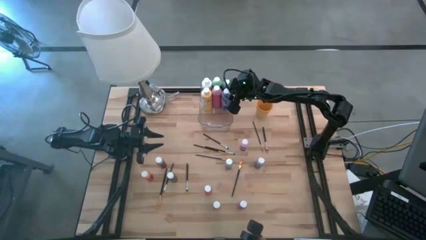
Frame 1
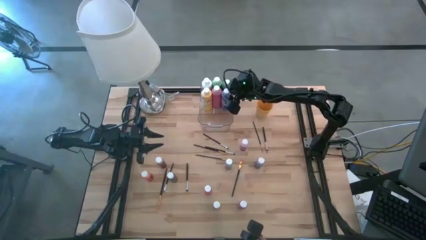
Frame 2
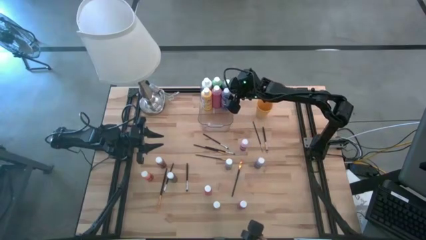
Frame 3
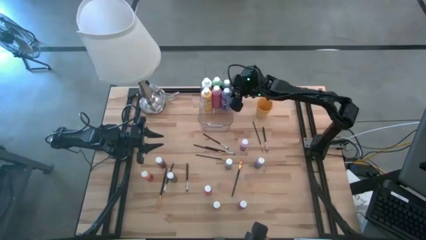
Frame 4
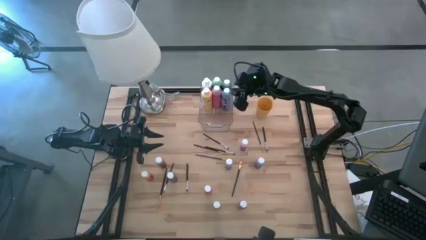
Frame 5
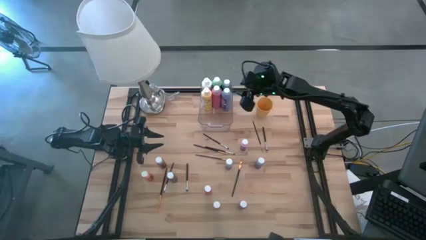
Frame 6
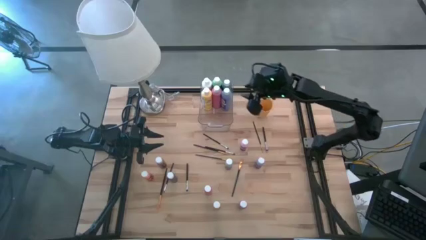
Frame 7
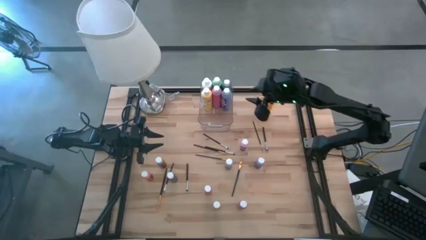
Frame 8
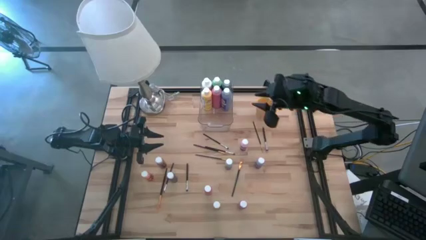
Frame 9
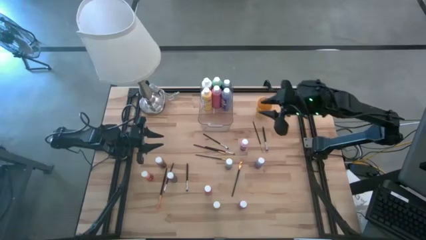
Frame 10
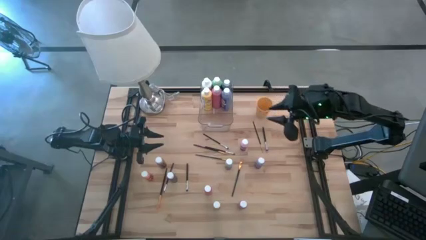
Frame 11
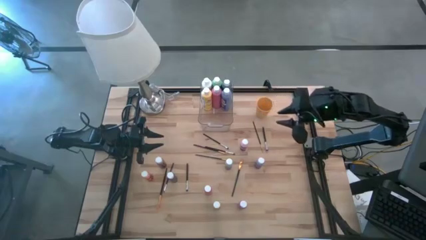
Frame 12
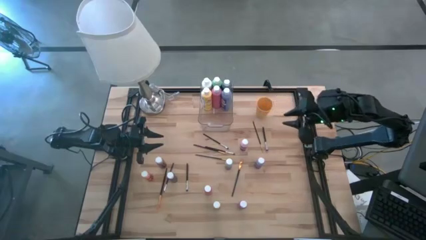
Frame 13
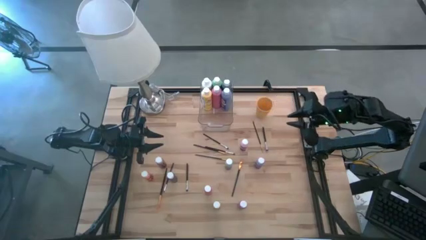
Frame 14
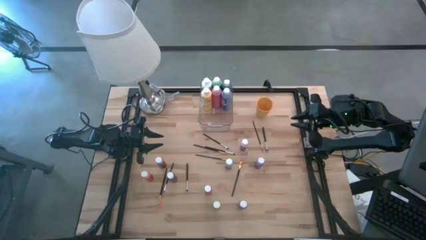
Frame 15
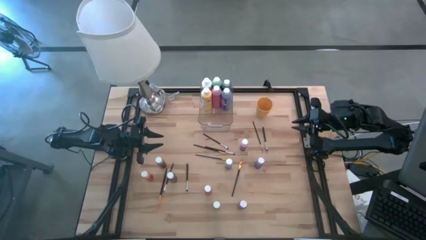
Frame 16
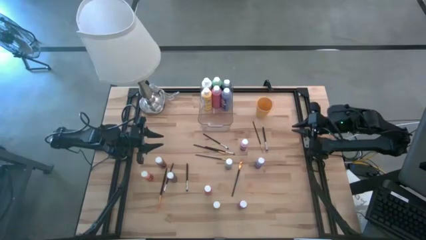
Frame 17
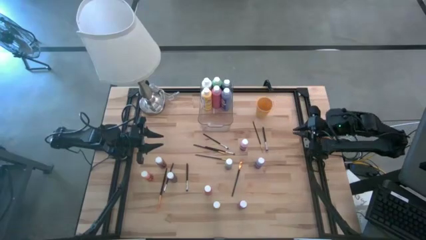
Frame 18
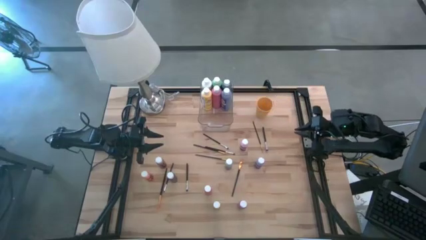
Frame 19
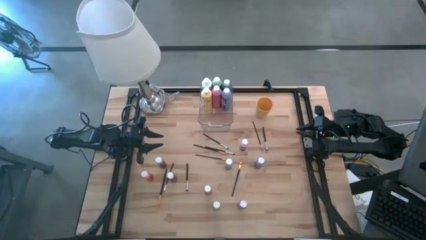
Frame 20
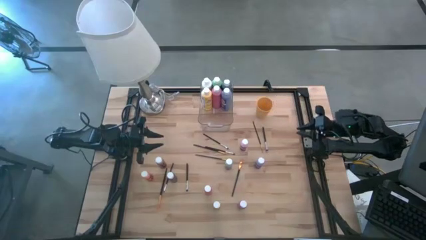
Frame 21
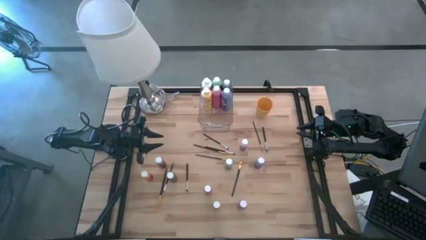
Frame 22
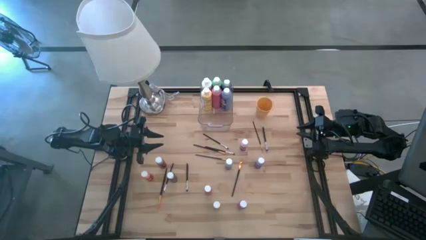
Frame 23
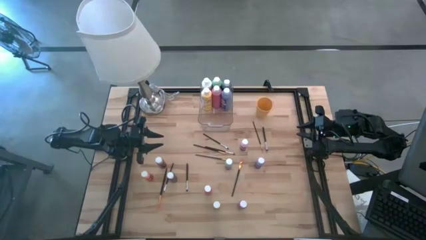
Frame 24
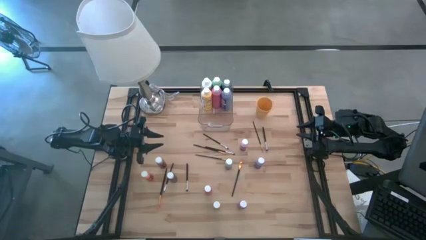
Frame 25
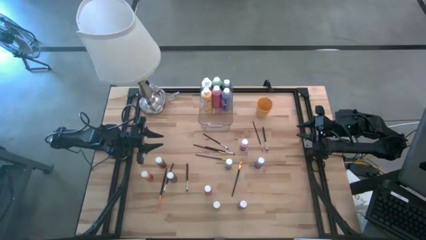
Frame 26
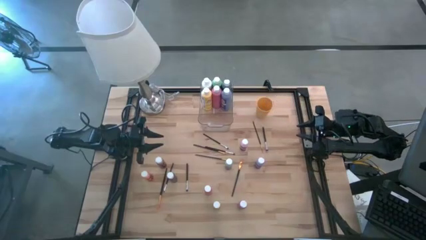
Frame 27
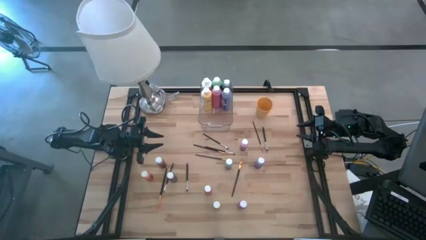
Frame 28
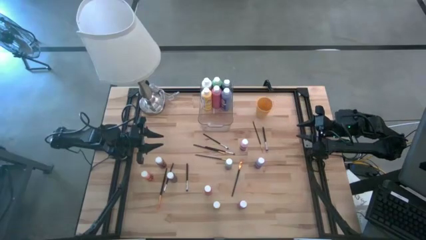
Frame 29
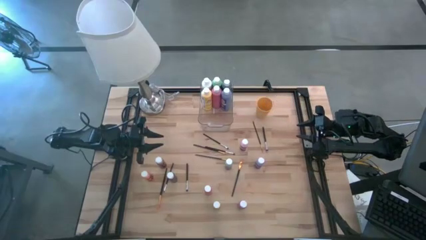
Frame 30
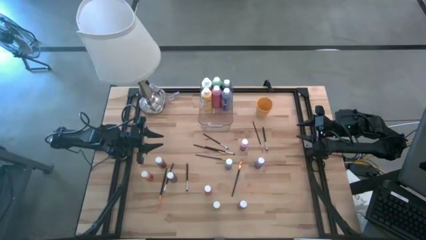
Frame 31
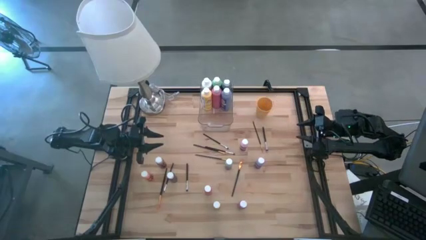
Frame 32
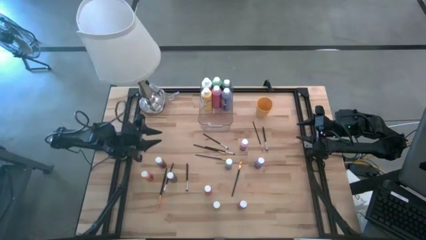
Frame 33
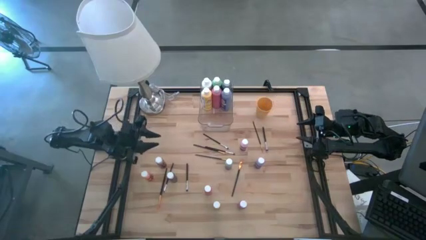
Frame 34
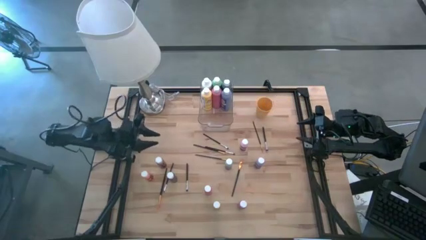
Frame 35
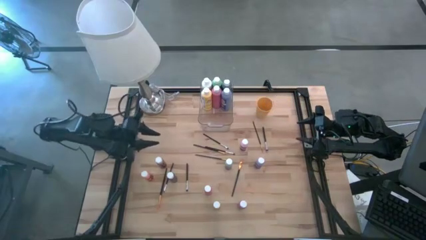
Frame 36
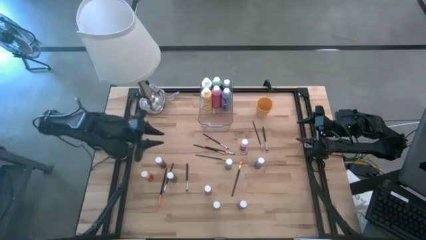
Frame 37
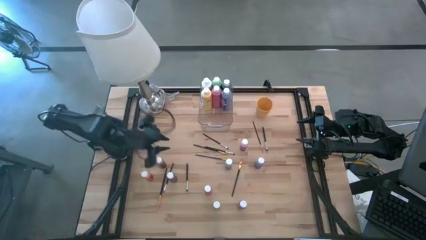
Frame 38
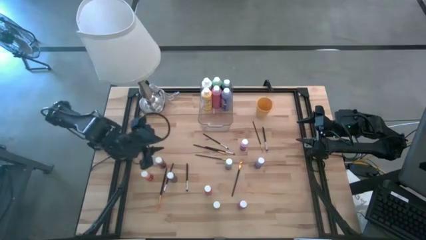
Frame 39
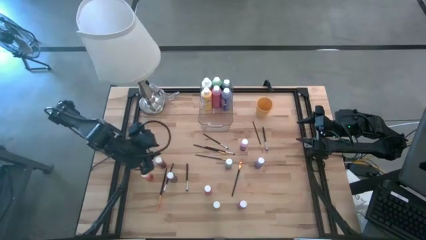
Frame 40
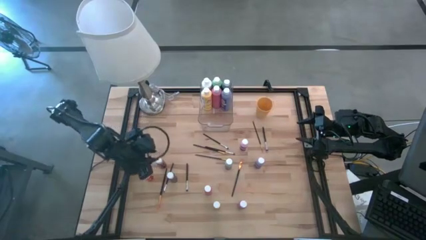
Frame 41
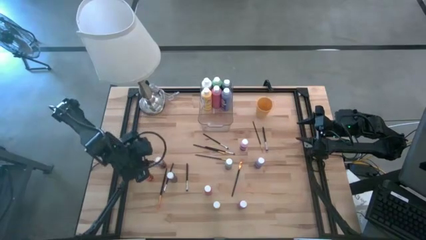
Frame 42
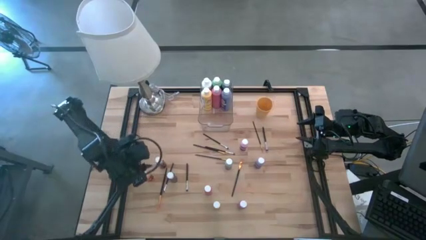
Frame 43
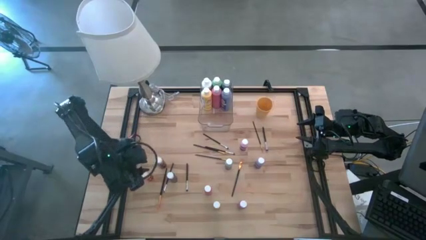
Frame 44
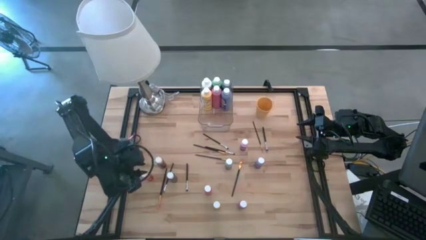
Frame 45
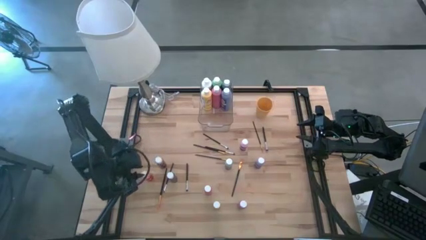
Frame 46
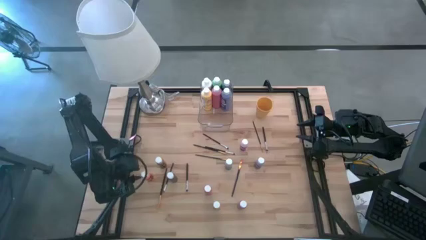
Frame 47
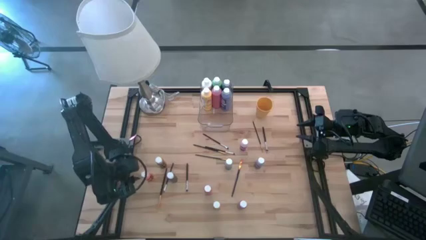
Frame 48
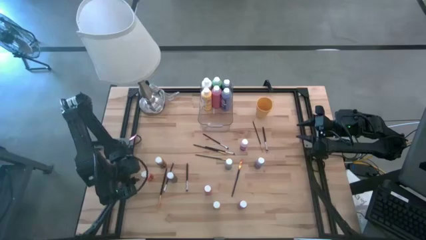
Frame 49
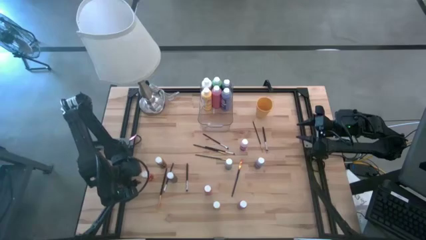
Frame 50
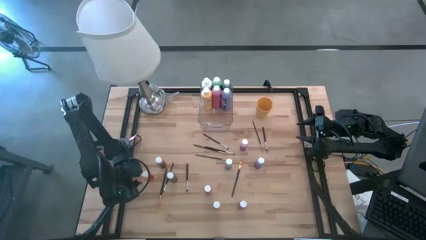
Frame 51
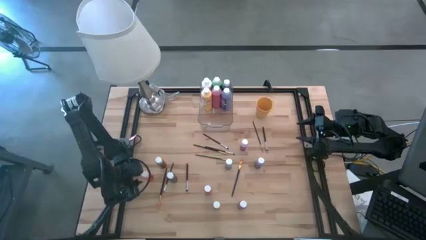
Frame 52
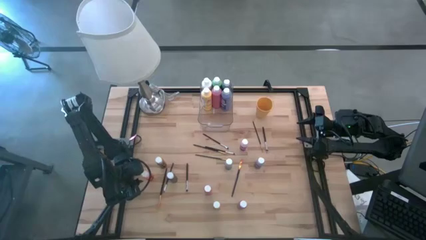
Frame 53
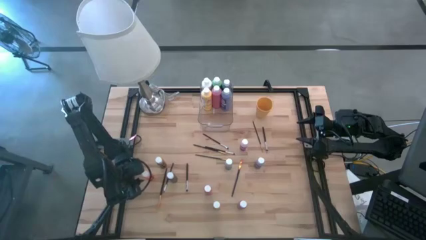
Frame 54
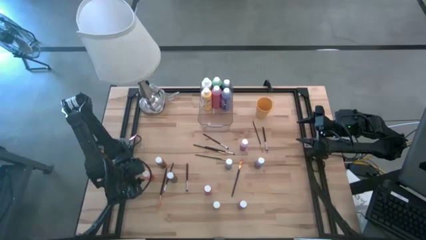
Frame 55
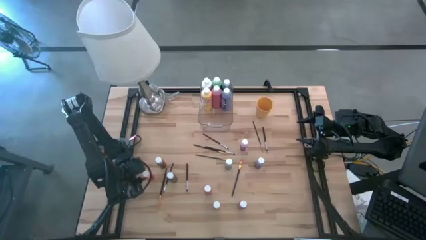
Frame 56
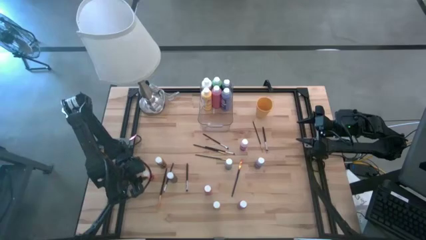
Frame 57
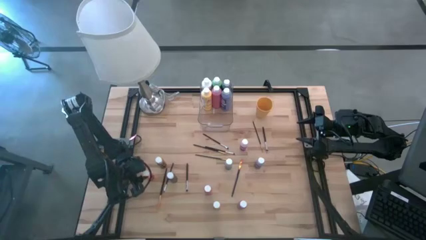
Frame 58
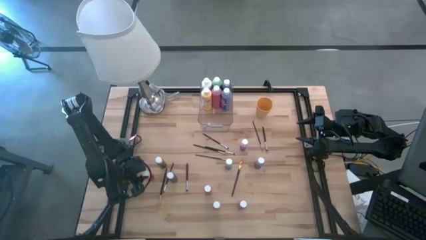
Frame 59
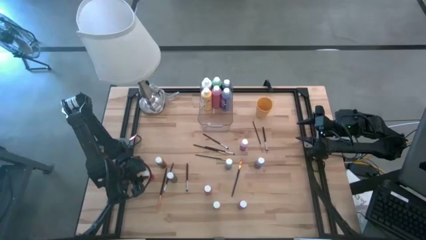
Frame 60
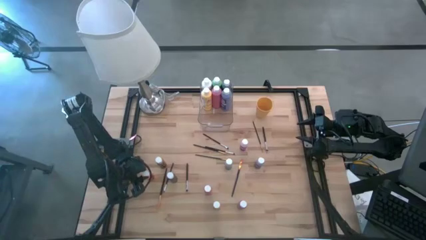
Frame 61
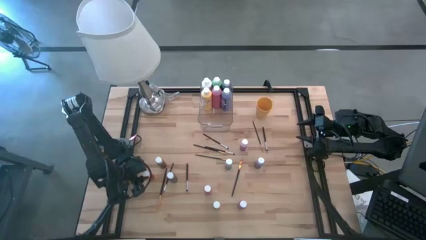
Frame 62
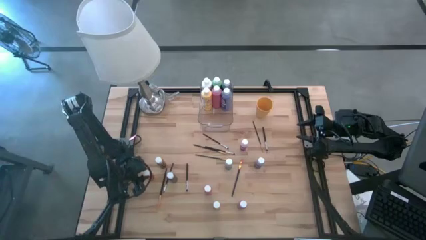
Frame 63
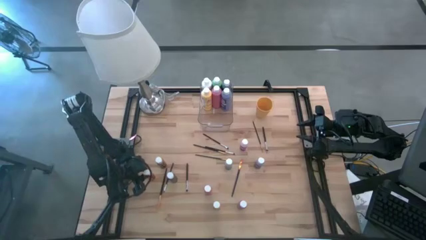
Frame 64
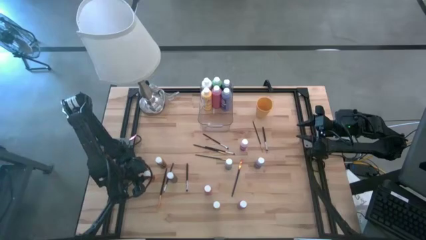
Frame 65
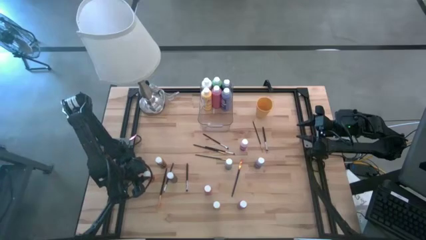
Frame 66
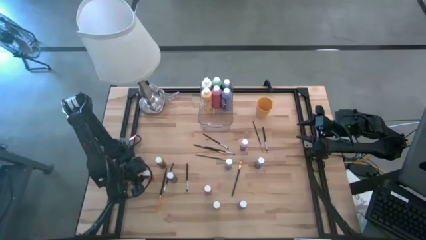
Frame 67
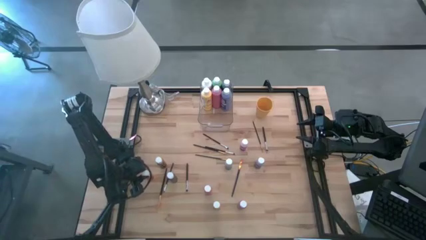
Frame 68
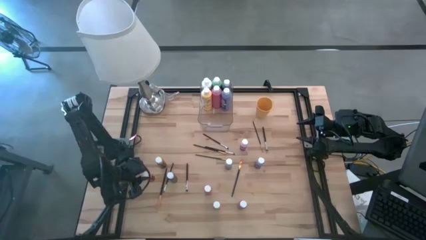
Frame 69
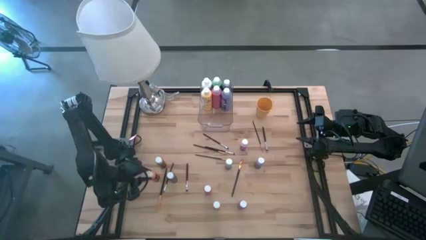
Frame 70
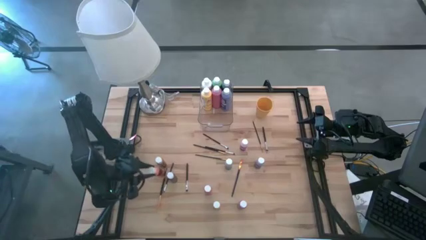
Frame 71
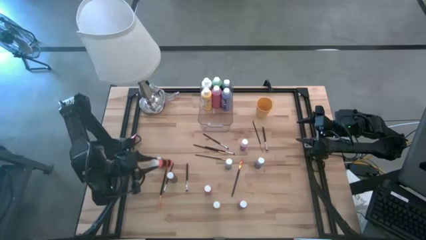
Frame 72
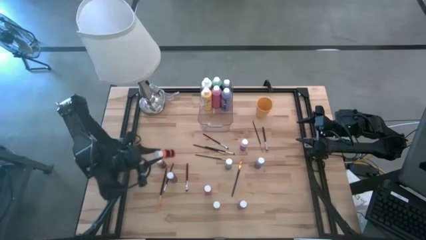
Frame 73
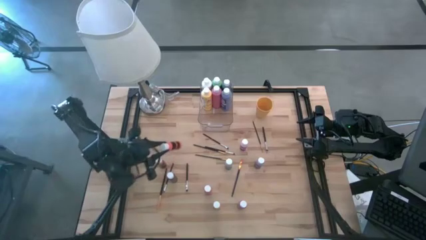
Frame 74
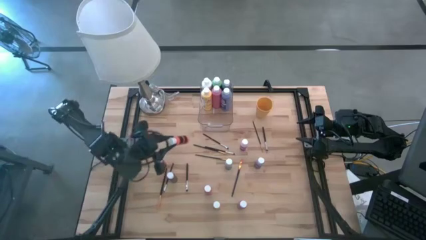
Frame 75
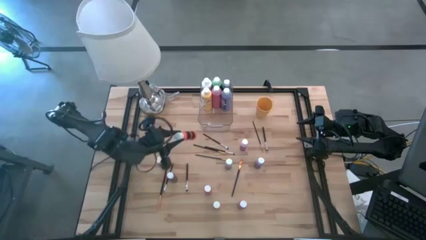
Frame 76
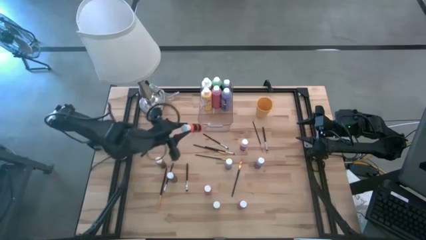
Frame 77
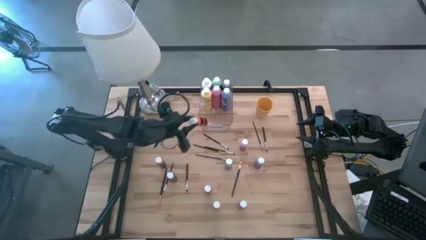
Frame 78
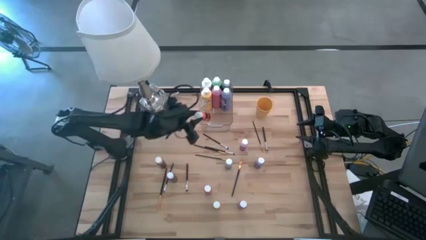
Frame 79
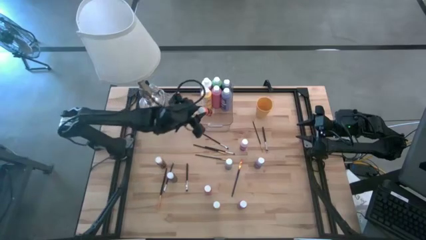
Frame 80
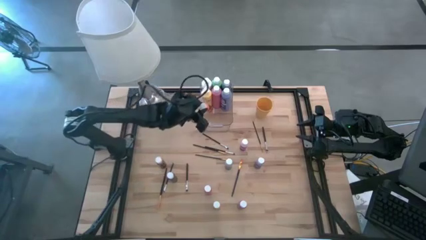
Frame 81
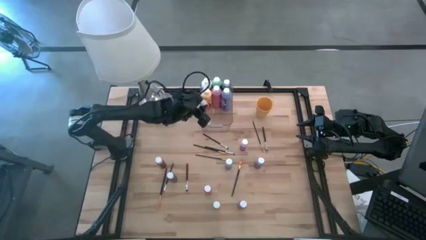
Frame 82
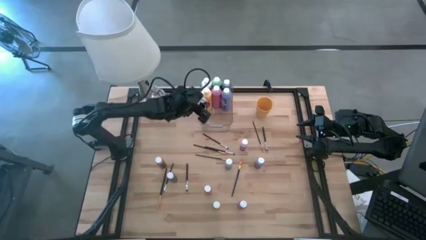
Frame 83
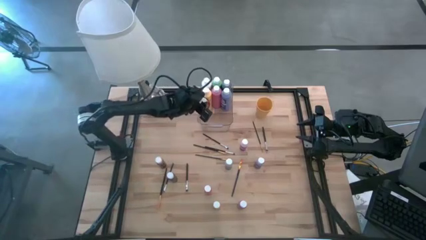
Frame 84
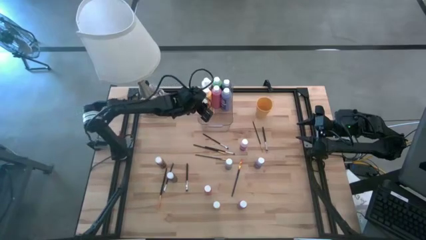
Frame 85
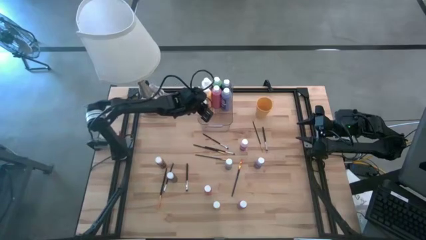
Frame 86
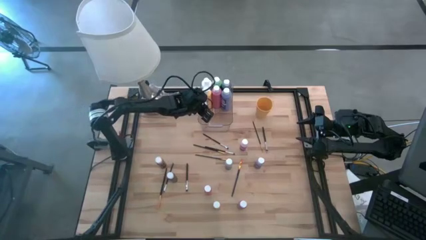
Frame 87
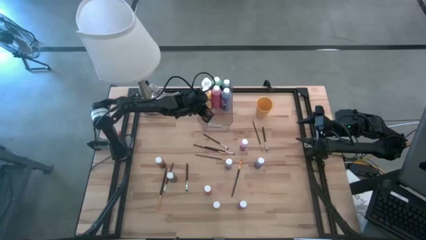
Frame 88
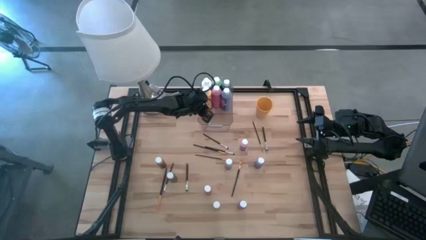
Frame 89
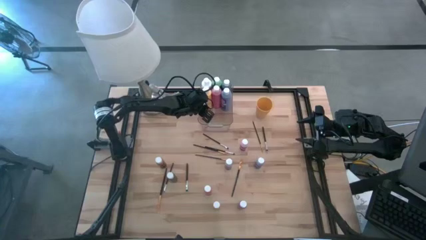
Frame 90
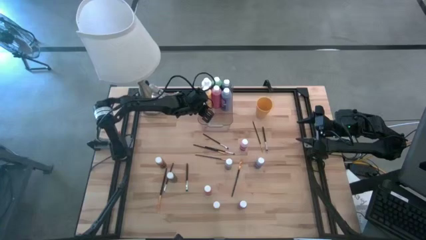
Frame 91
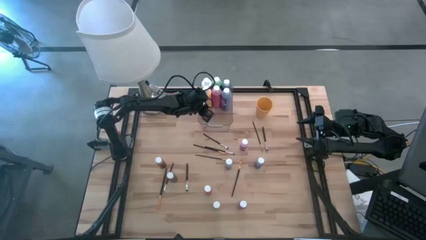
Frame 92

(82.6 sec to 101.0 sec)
Task: Pick & Place Paint Supplies
Put the small orange paint bottle into the bin
